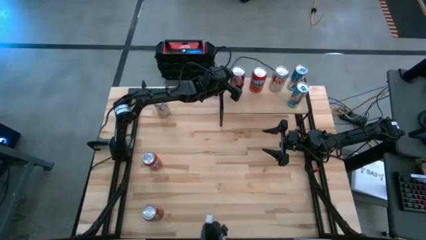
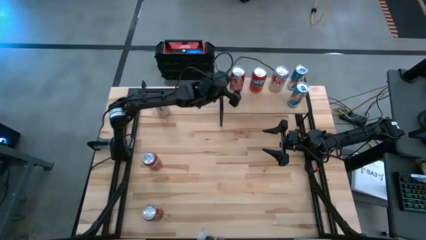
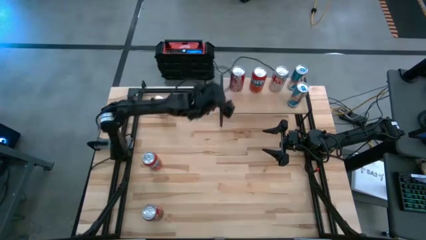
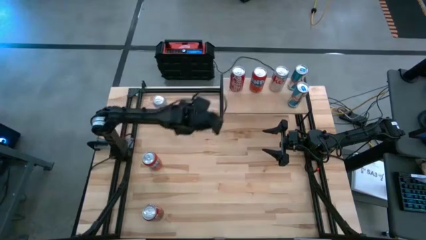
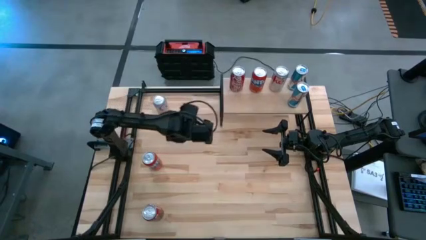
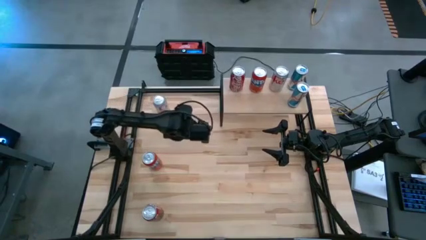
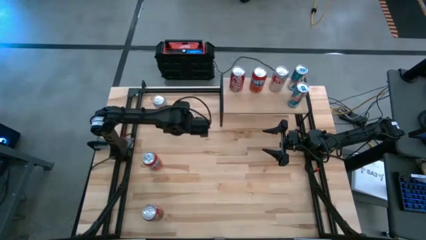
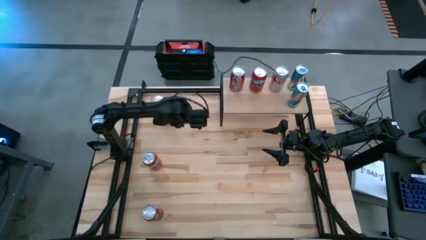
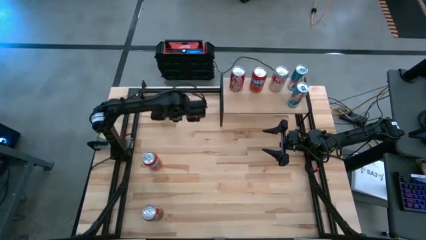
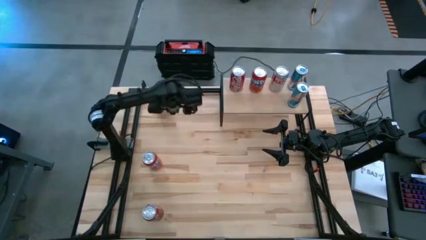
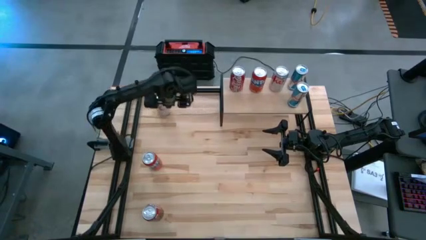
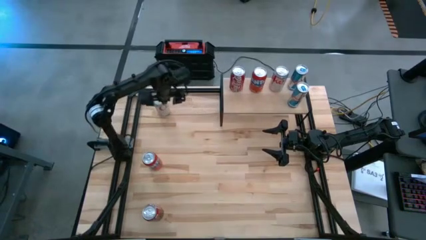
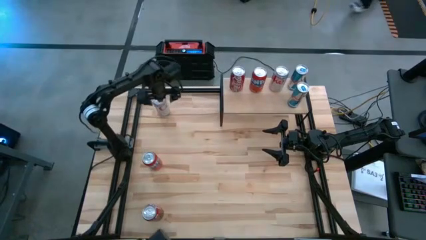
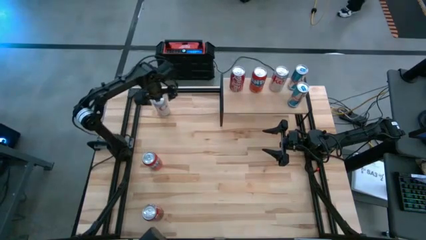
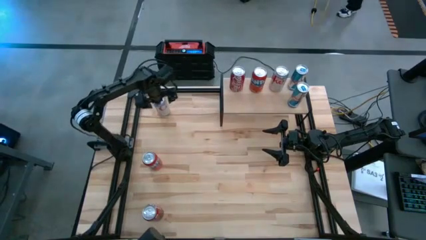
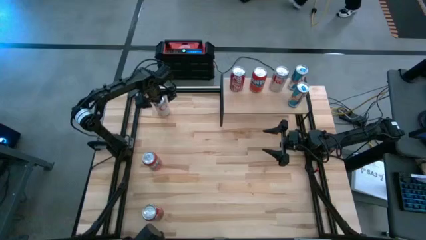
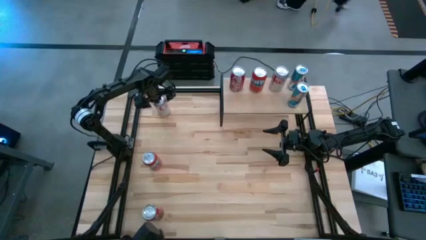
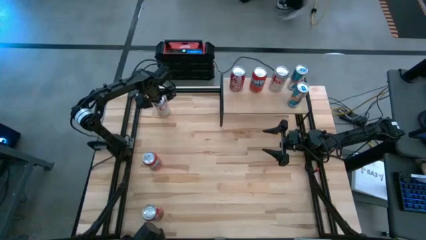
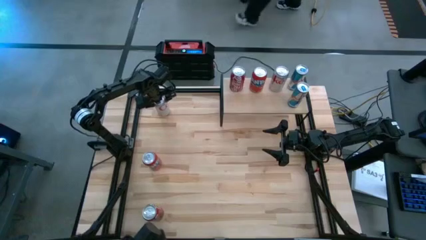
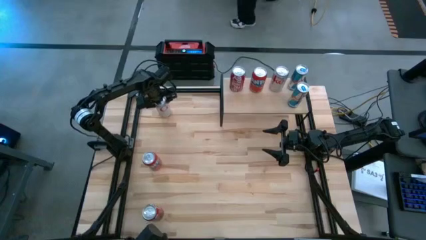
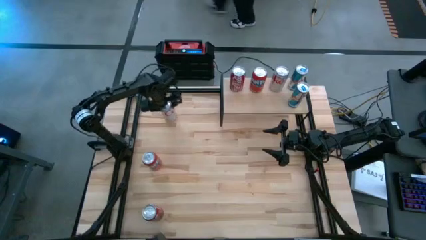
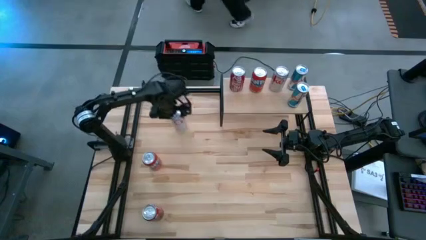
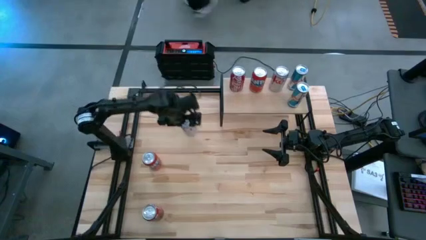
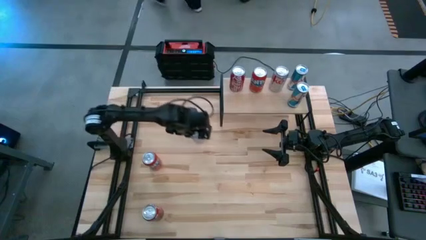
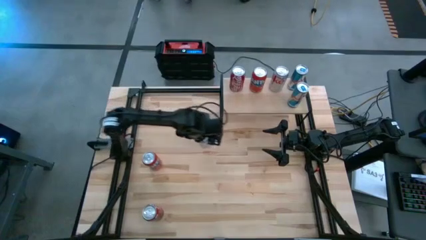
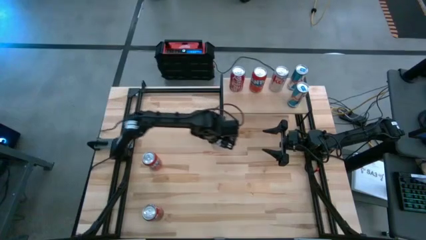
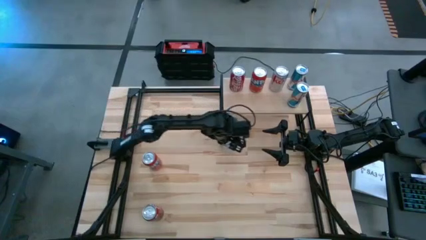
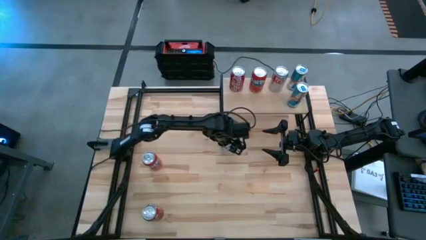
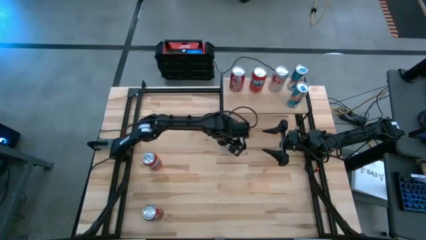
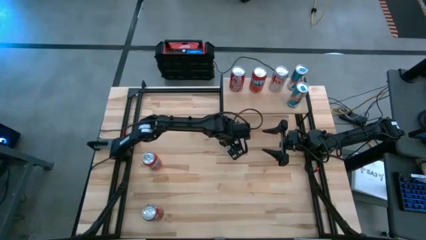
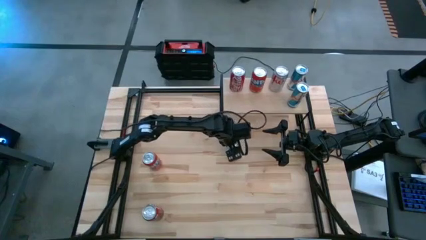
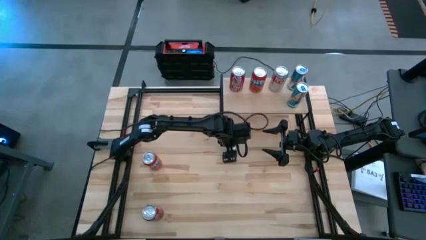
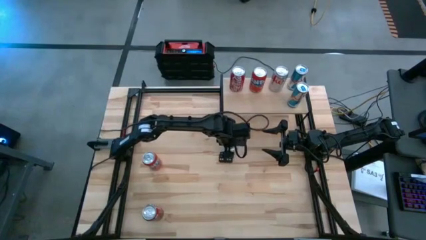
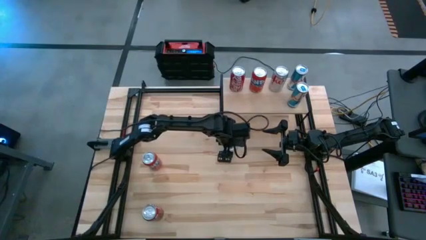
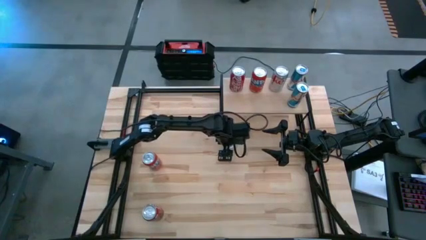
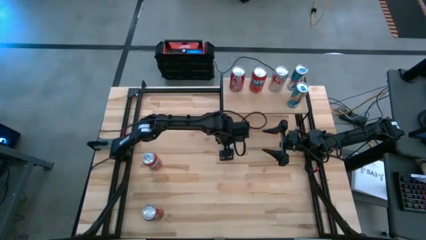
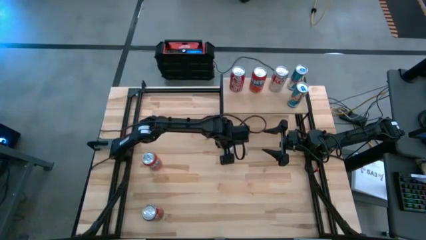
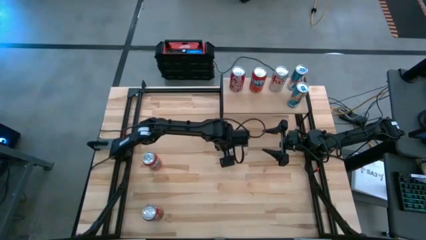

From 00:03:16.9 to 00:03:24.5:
Task: Place canned beverage on shelf
Move the silver soda can to the bottom of the shelf

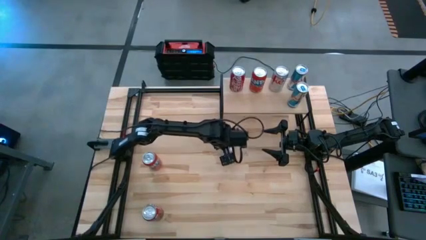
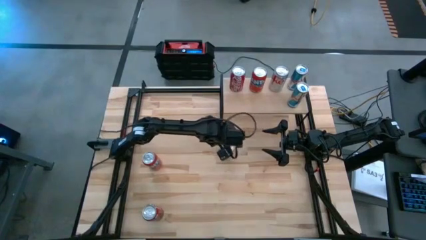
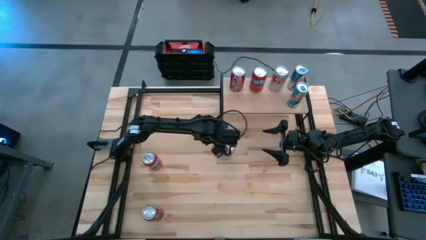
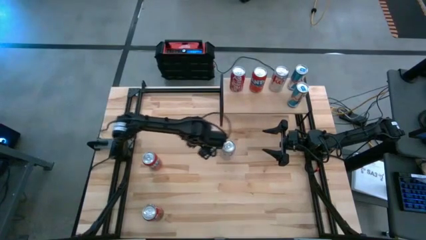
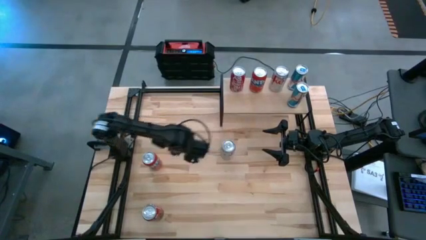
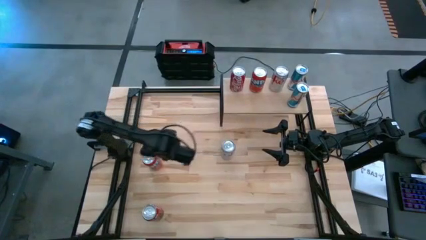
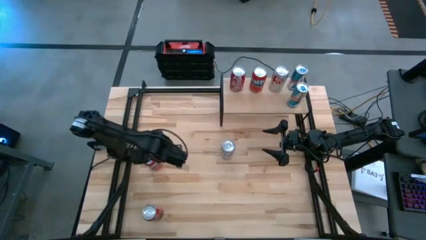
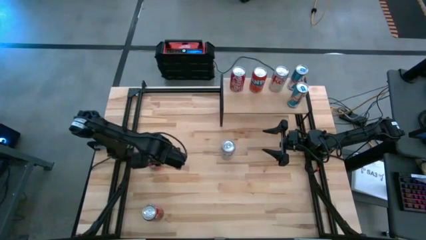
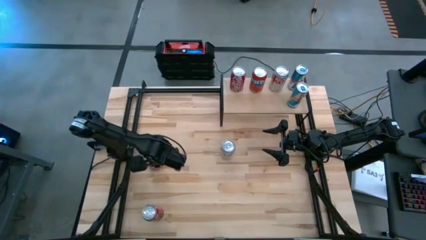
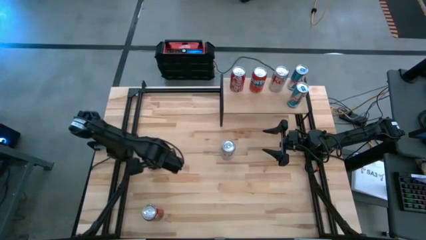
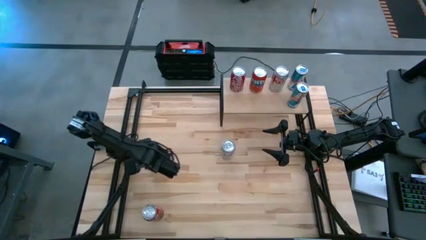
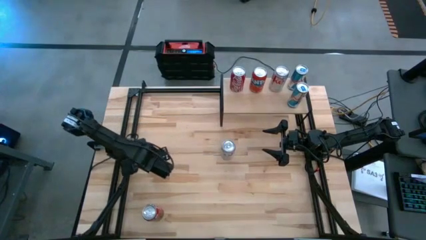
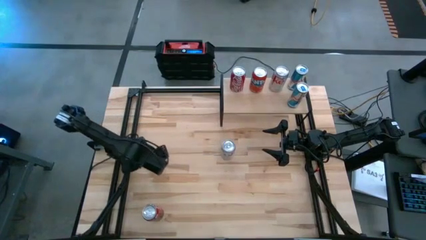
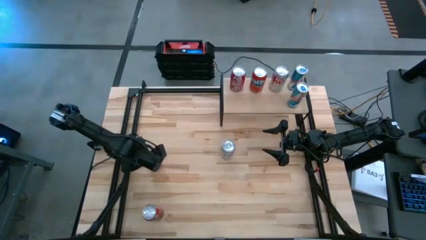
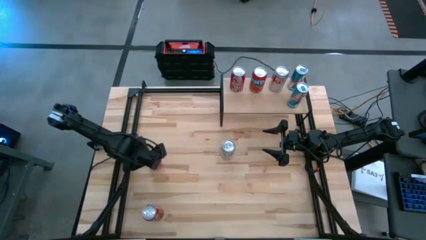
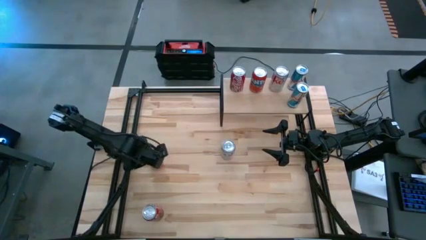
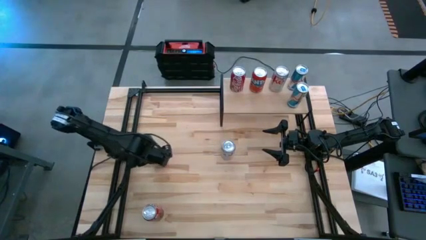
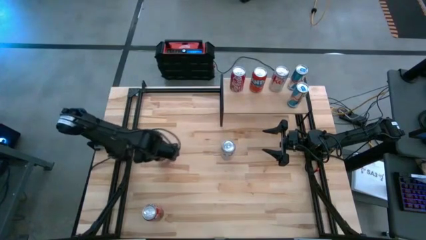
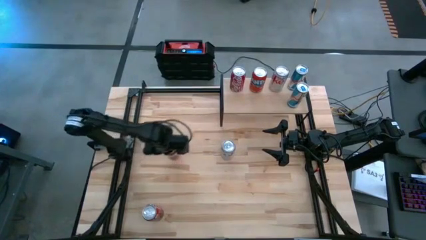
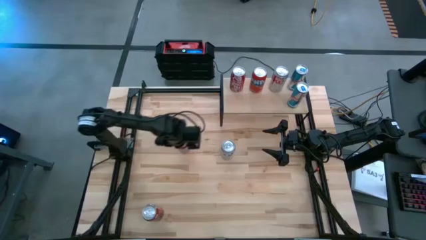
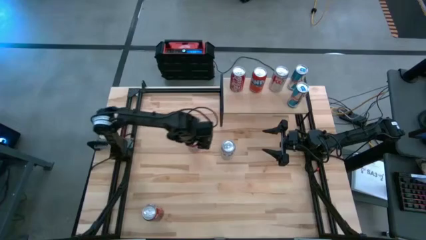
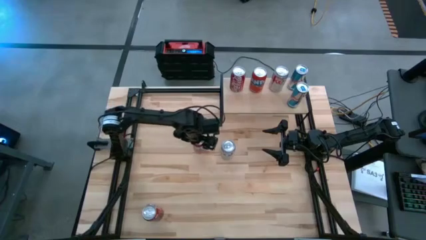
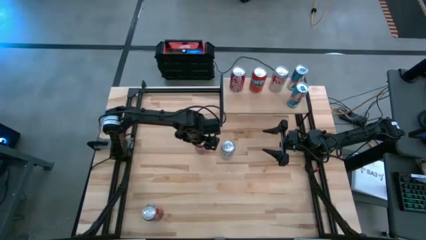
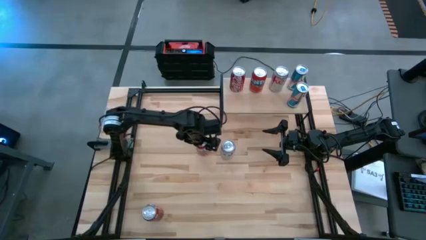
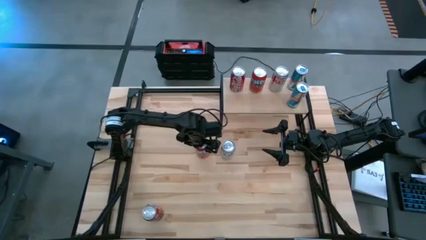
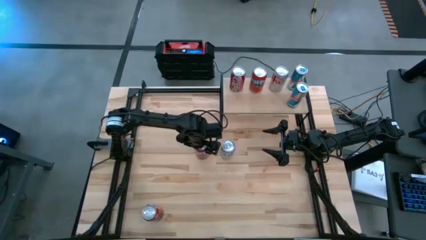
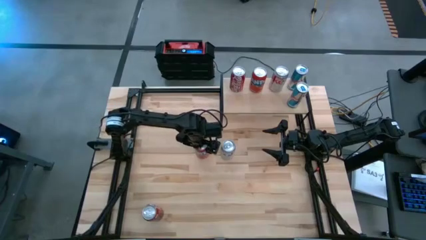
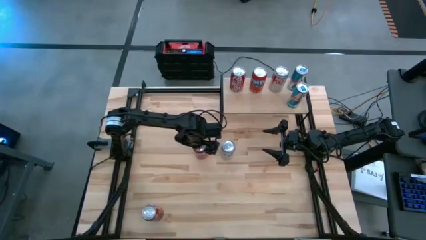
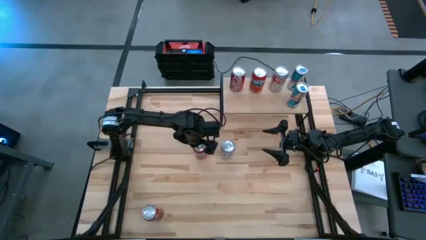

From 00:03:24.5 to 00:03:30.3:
Move the red soda can to the left of the silver soda can

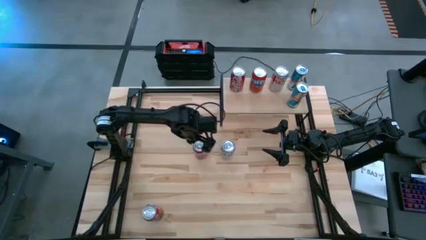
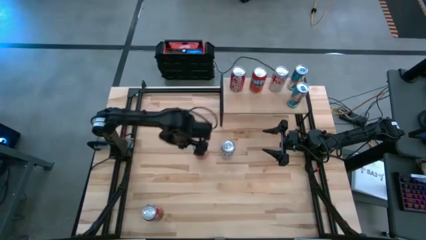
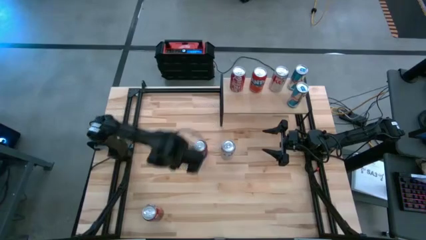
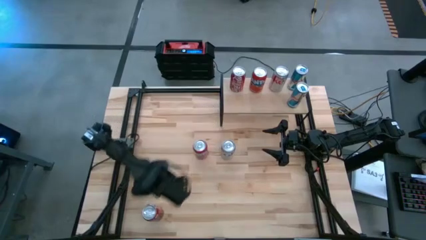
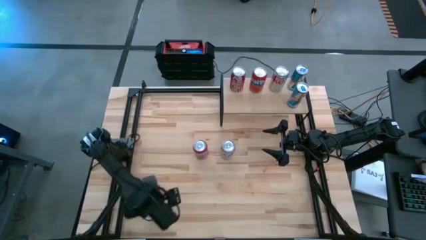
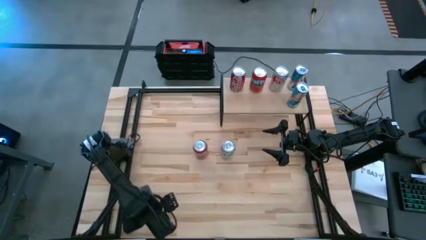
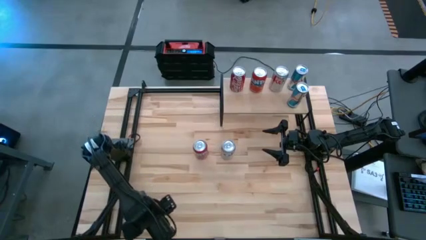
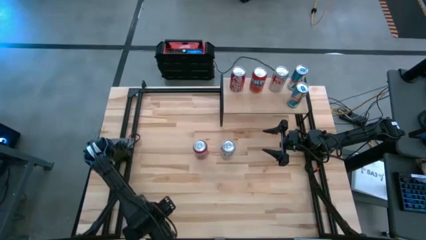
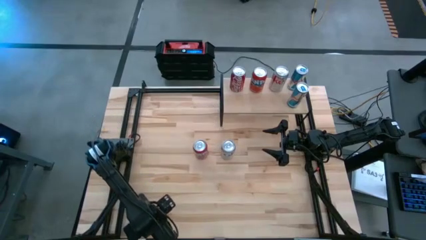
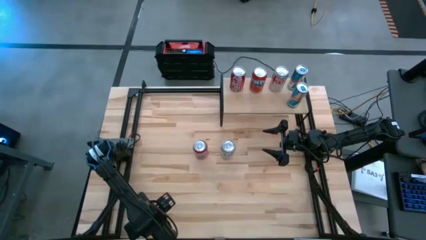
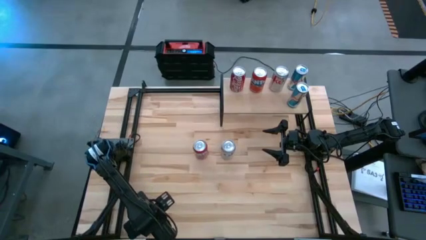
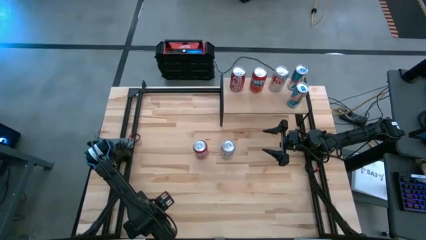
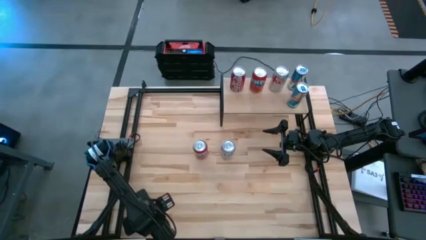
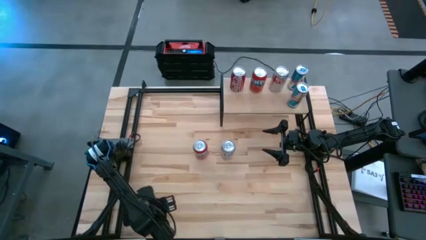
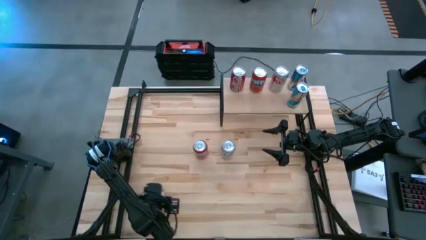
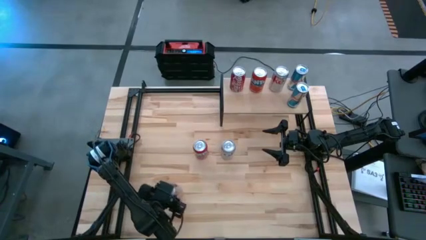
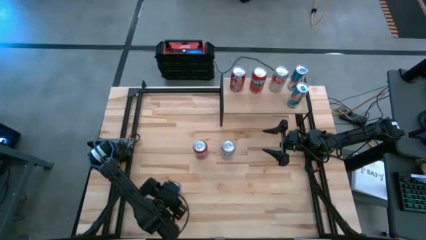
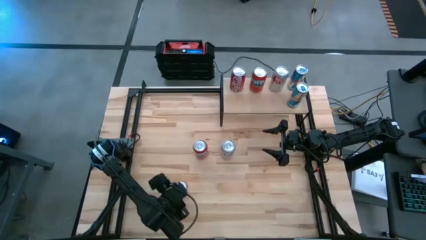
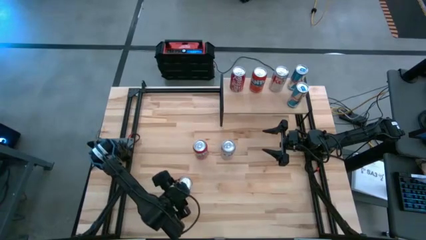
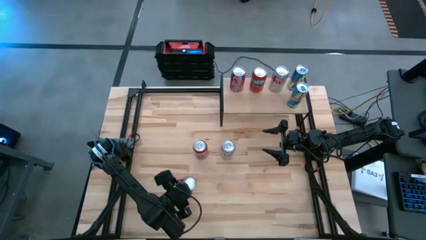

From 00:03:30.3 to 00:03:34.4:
Move the red white soda can to the bottom right of the red soda can
